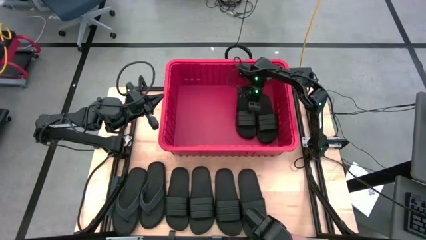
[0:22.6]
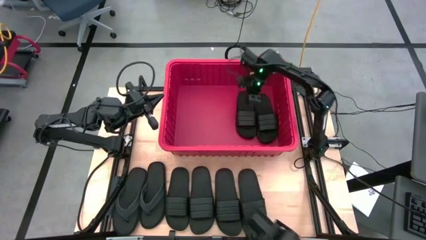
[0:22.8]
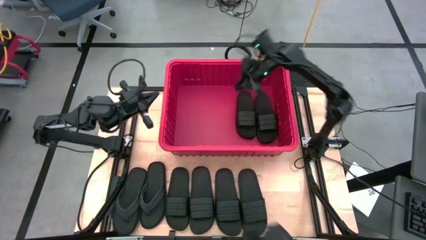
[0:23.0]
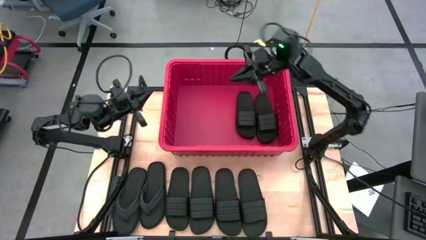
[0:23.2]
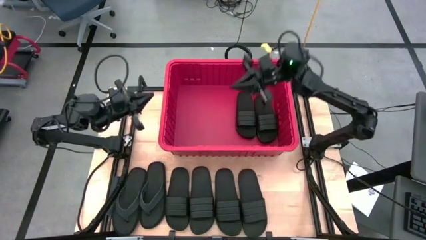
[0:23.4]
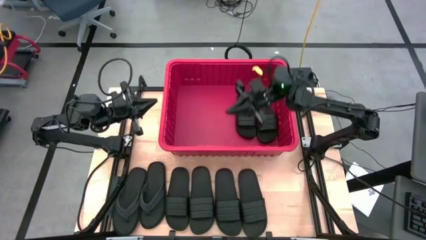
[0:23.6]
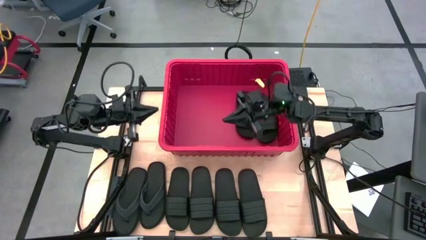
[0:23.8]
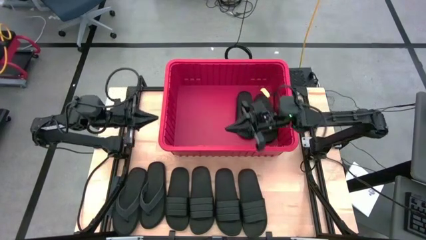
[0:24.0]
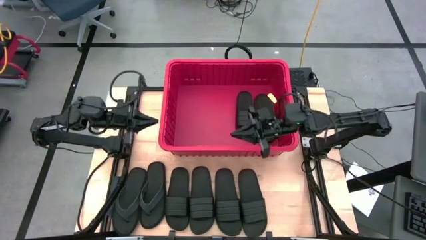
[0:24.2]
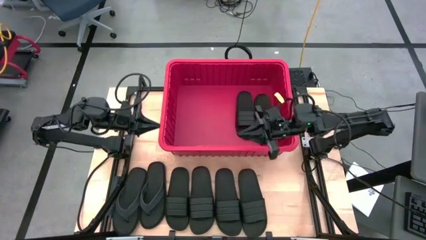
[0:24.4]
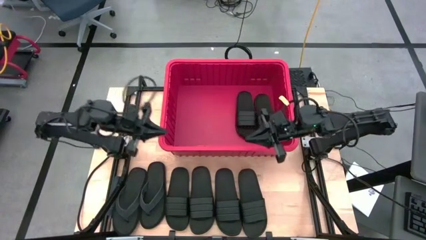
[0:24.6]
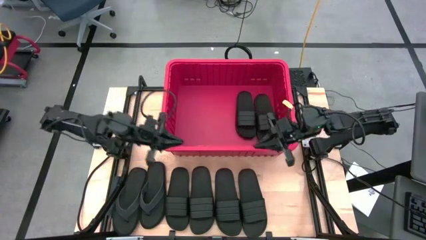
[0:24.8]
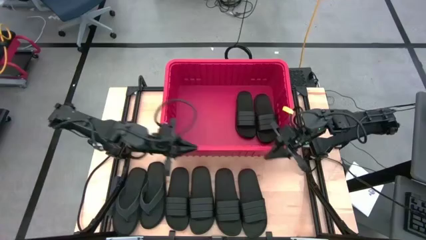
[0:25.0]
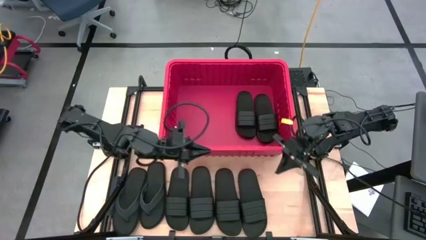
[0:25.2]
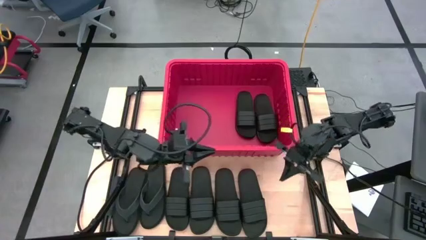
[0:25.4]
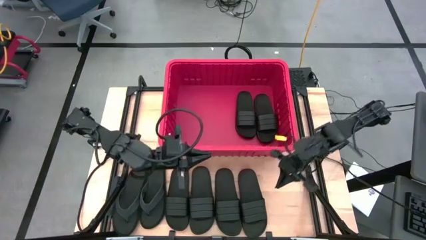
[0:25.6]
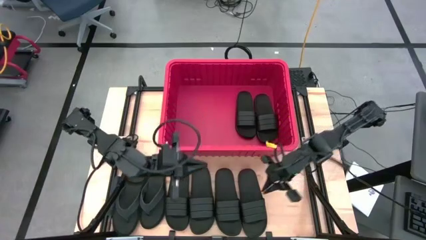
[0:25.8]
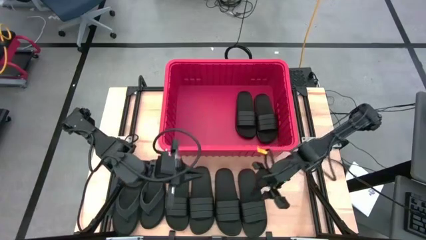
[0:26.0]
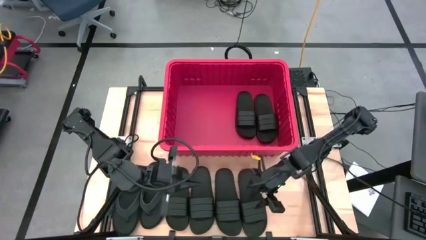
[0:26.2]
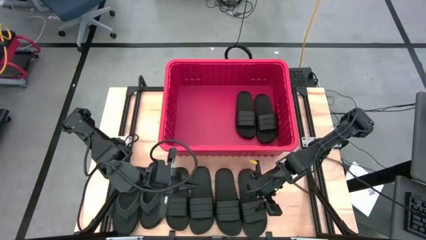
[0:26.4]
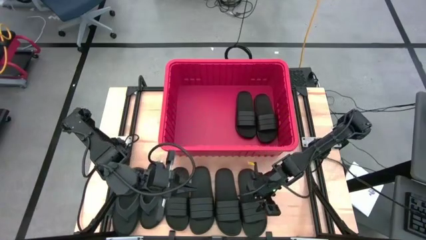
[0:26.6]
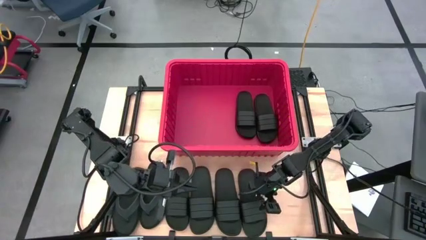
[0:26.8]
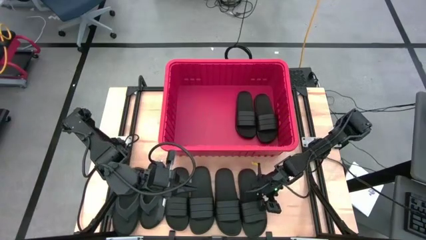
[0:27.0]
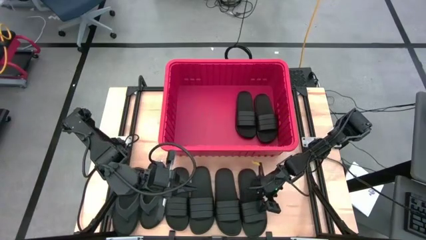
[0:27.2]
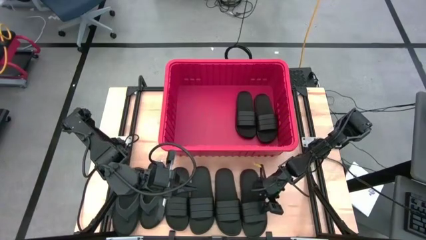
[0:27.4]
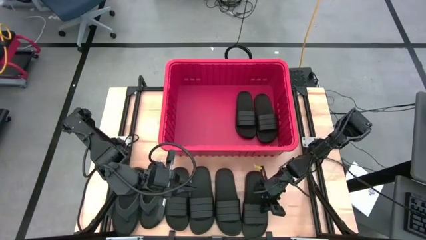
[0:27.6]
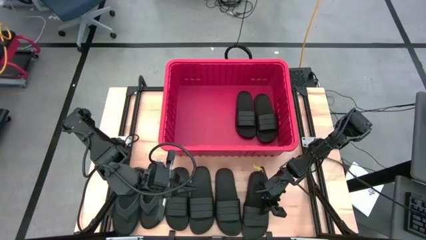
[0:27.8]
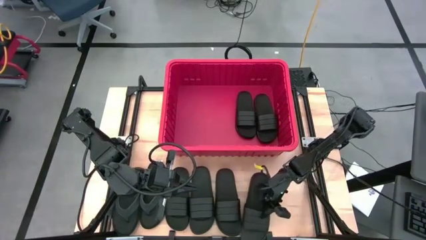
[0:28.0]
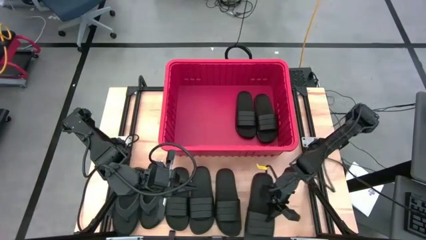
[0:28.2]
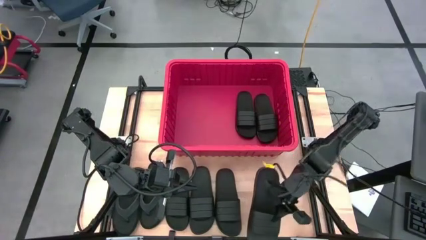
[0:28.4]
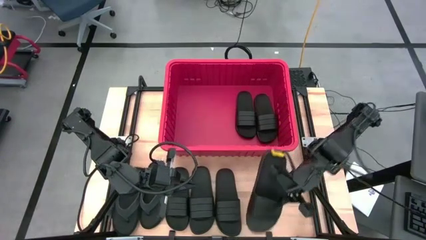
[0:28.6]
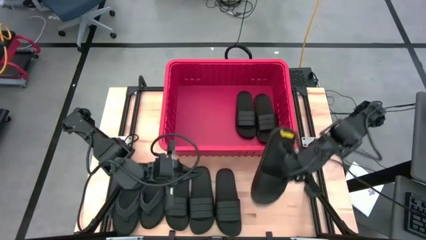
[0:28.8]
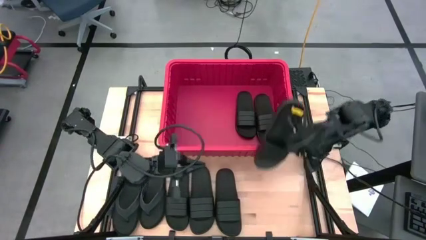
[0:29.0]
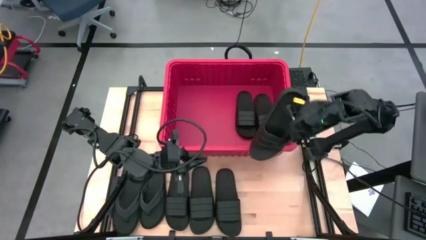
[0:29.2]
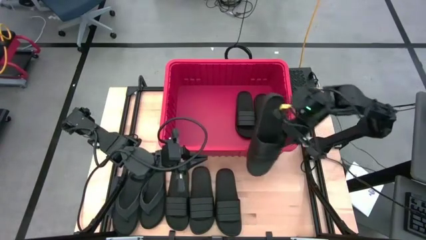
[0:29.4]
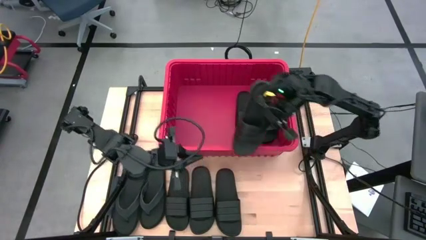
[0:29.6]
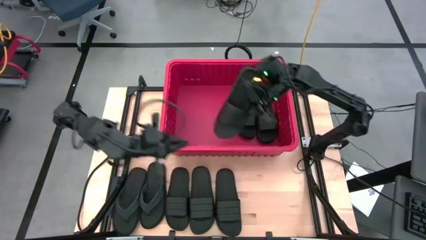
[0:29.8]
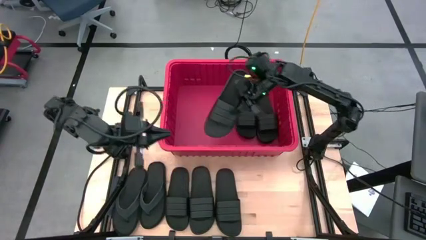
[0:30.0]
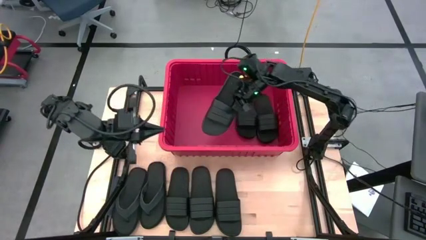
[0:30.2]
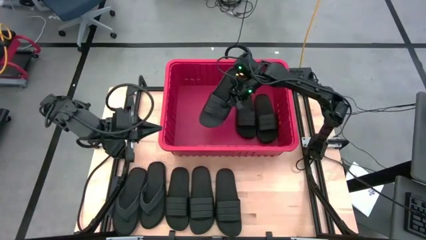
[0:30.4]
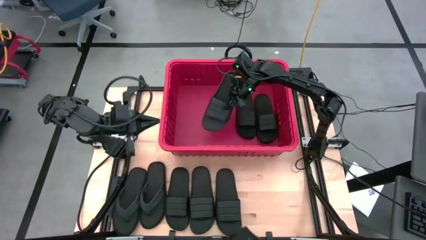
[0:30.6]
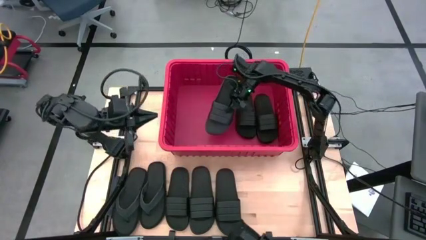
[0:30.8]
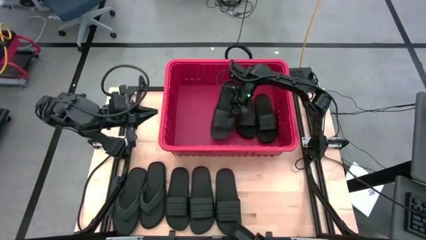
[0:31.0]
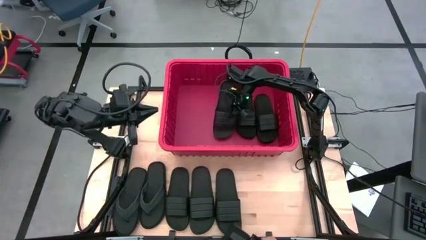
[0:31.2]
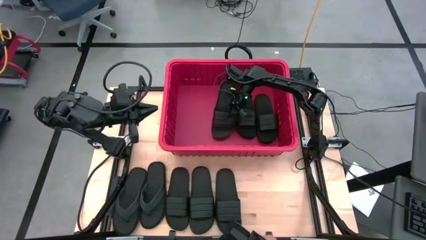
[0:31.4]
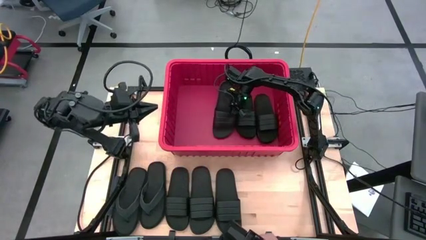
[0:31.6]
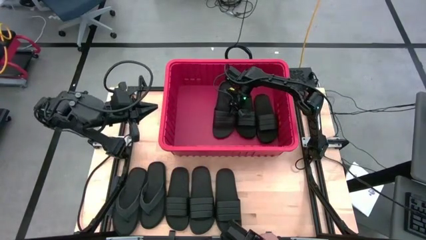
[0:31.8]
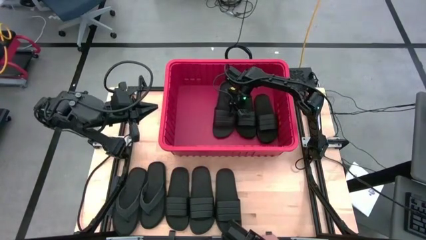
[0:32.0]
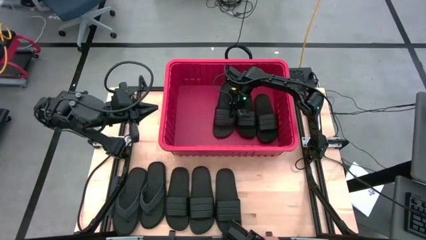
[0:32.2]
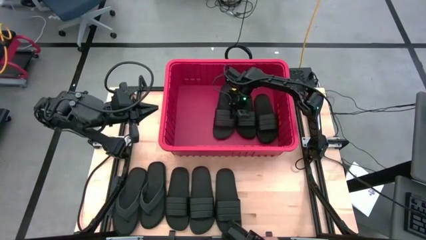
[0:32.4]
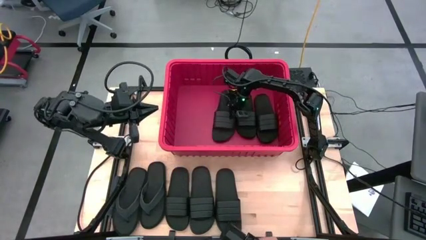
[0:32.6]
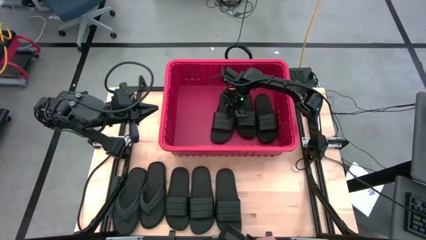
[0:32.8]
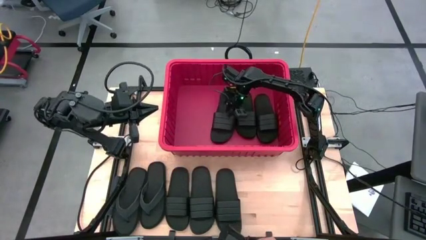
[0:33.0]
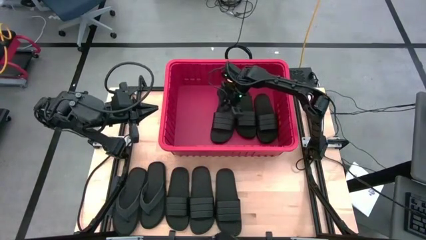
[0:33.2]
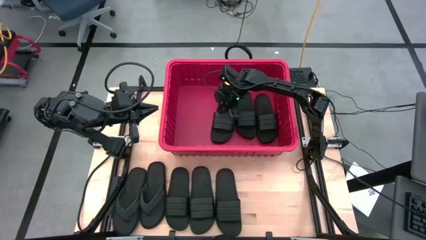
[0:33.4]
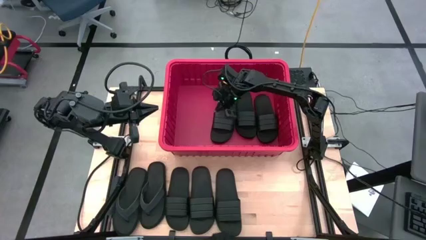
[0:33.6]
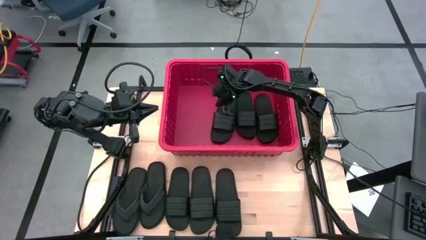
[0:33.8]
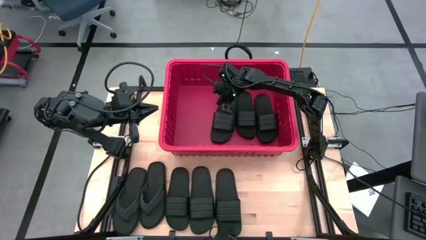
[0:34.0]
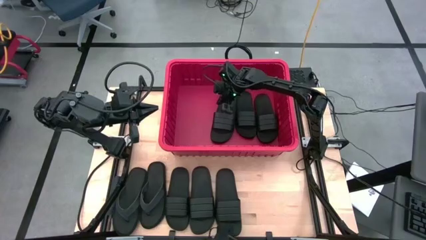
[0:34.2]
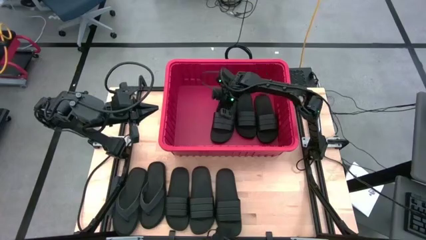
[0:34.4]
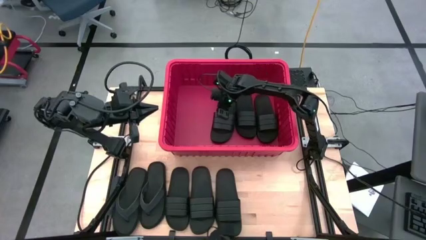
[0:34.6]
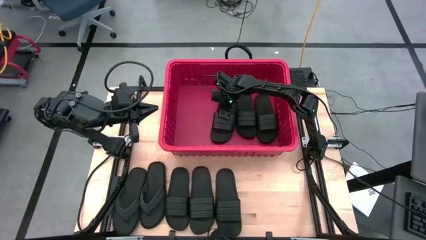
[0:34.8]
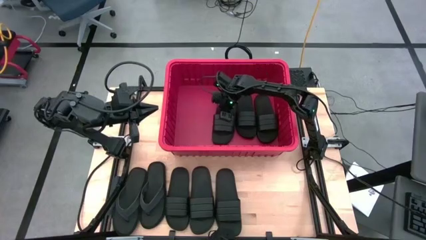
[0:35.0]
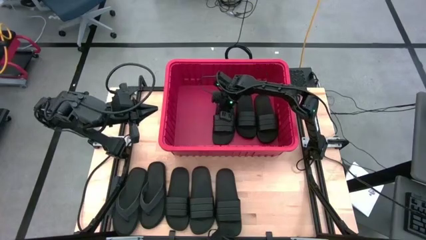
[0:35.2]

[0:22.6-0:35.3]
Task: Pick and place slides into bin
Put the black slide into the red container
